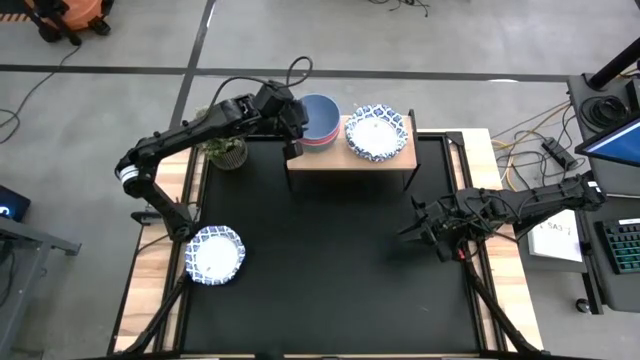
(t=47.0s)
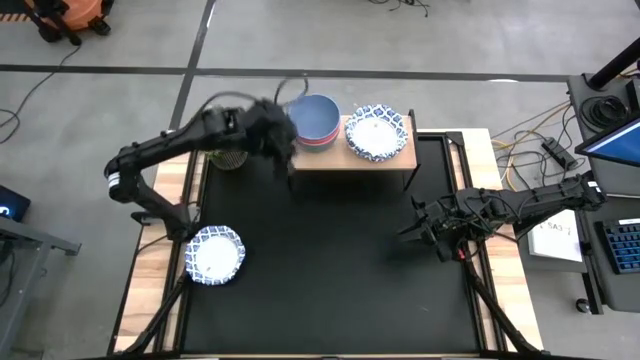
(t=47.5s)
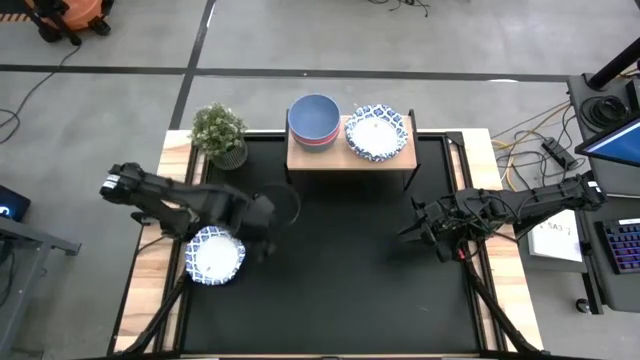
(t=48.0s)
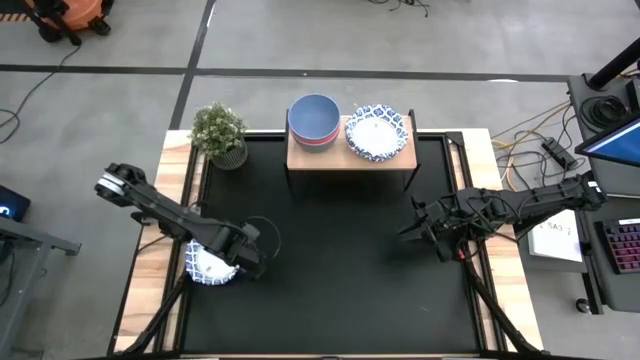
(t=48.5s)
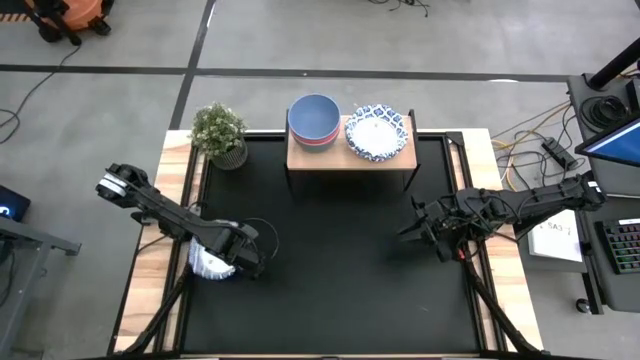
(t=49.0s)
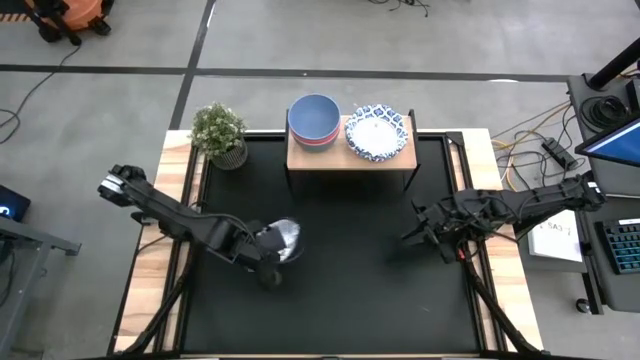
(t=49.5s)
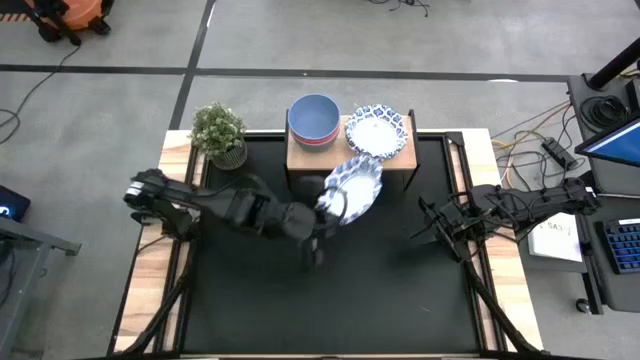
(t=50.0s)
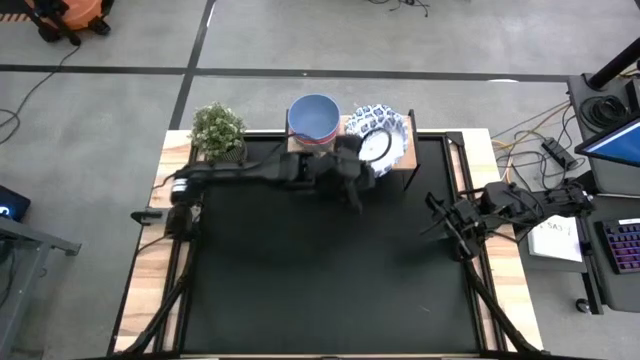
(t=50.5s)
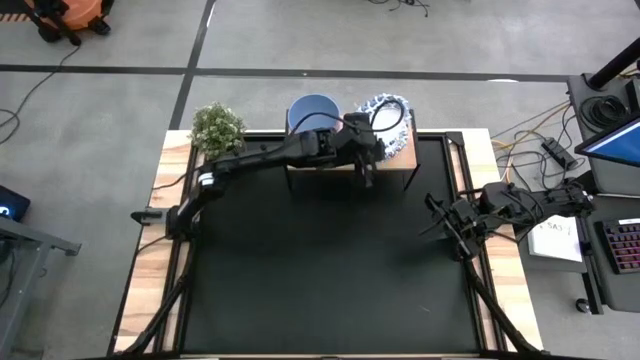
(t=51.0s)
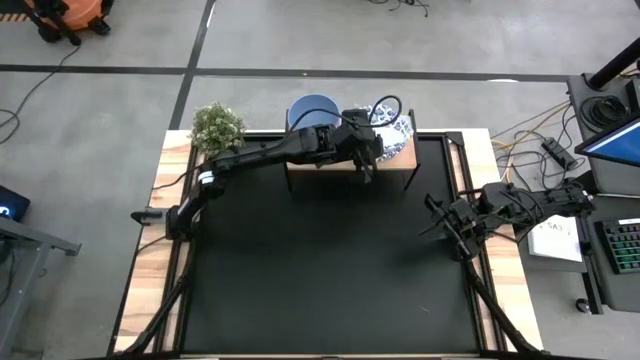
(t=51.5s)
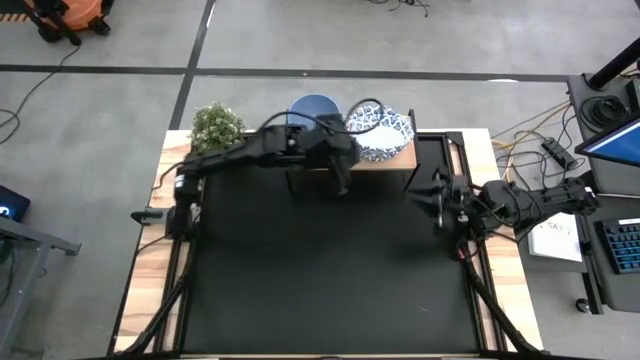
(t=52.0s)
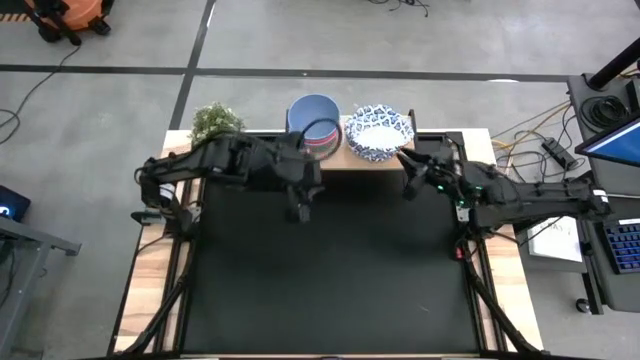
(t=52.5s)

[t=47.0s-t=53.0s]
Task: Place and stack bowls onto a shelf
Stack the white and blue paper plate on the white and blue paper plate on the shelf

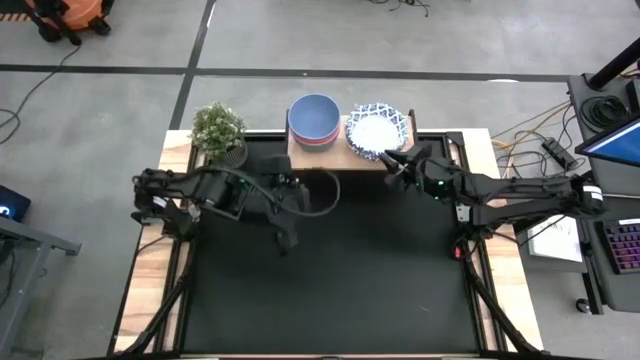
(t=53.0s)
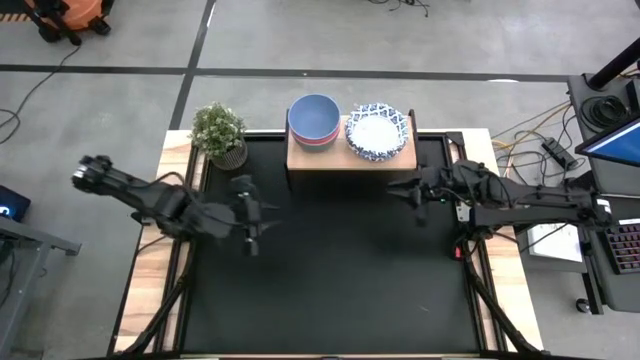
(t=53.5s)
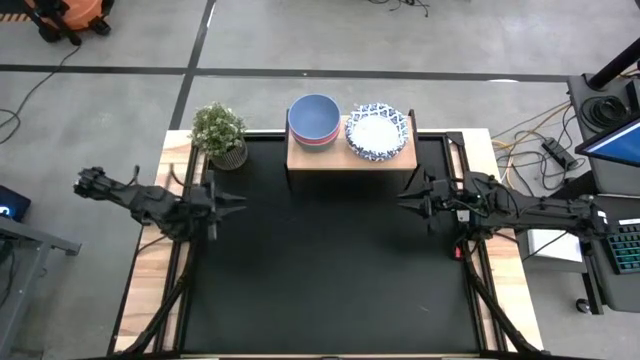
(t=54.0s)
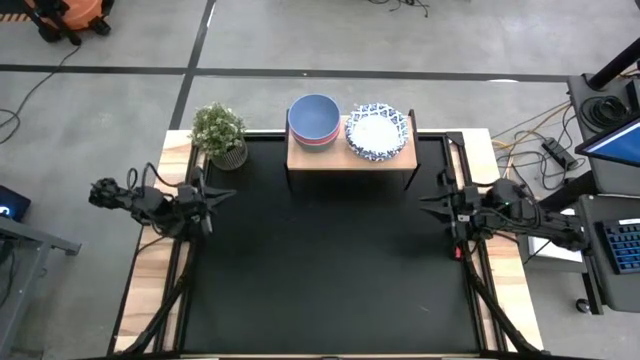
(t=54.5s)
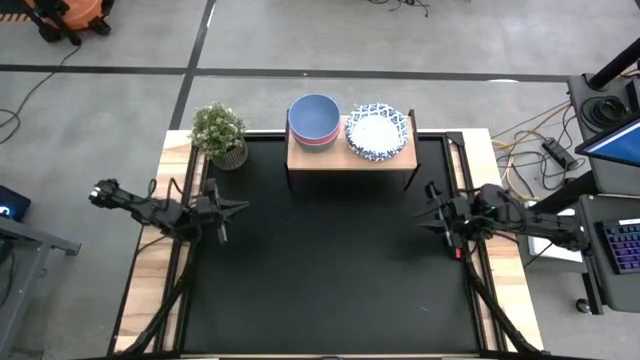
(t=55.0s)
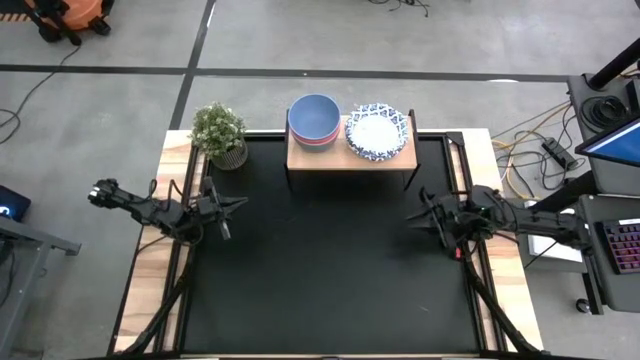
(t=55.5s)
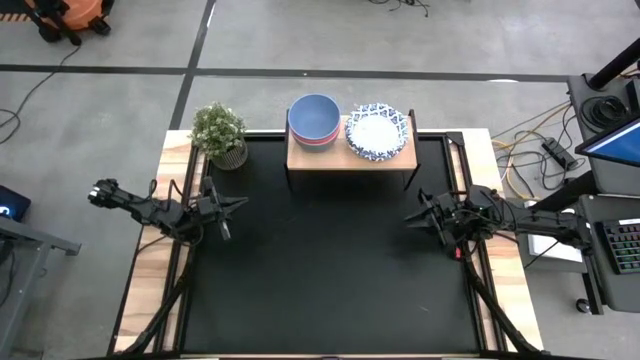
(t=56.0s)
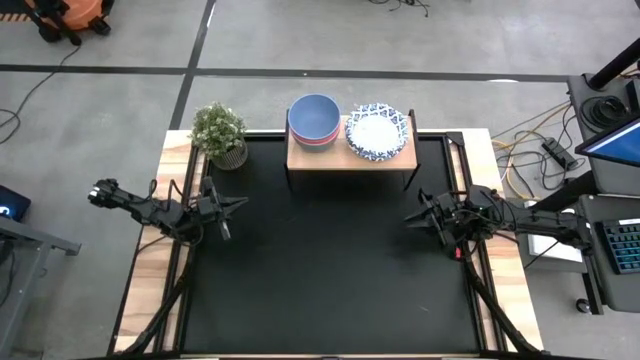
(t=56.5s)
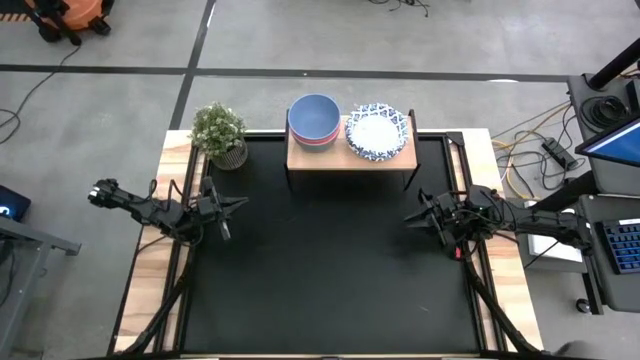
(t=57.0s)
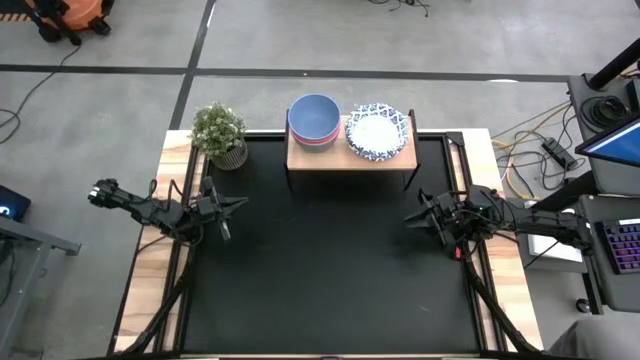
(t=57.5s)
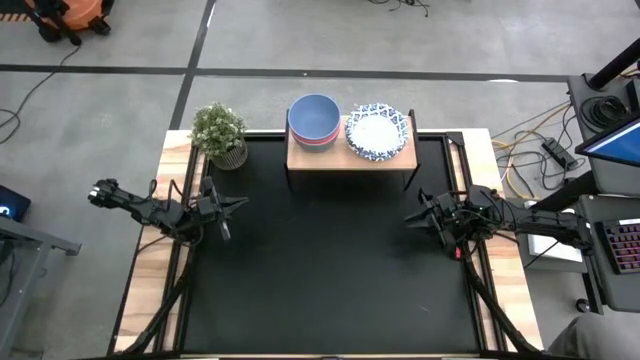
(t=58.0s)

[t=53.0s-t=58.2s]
Return to Home Position

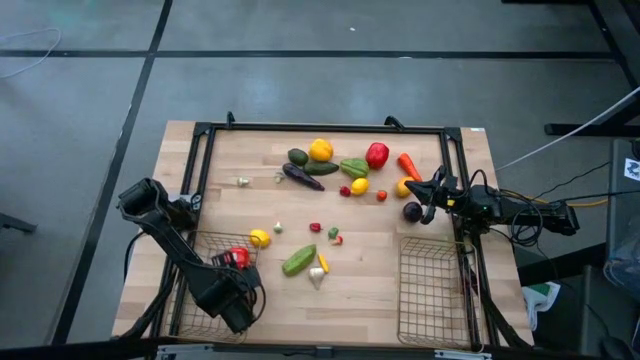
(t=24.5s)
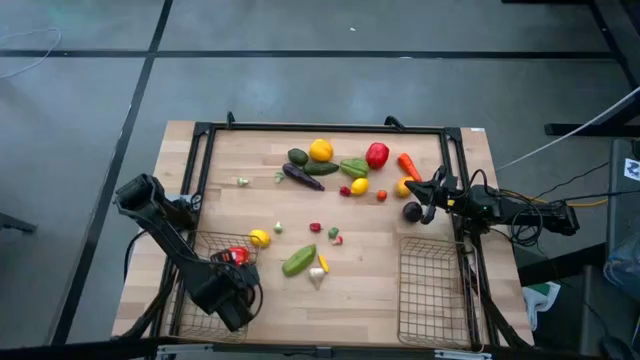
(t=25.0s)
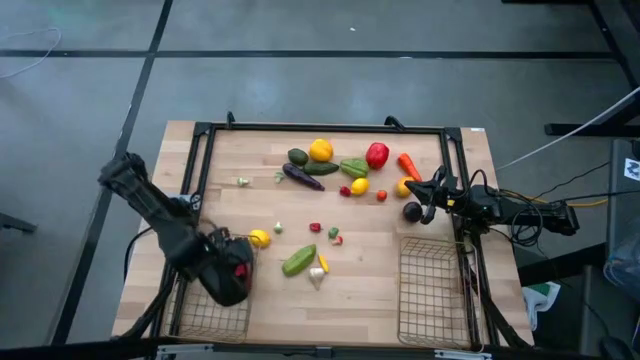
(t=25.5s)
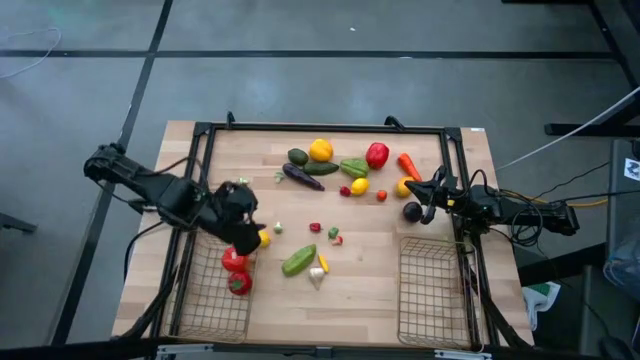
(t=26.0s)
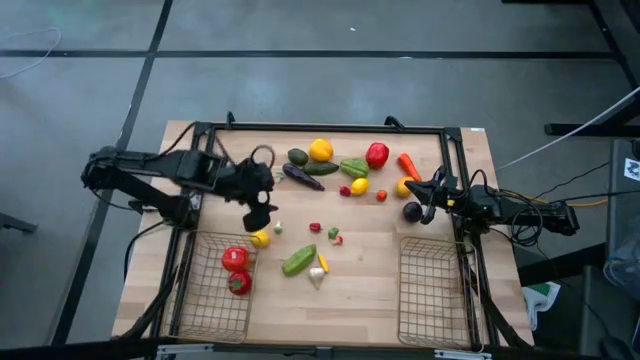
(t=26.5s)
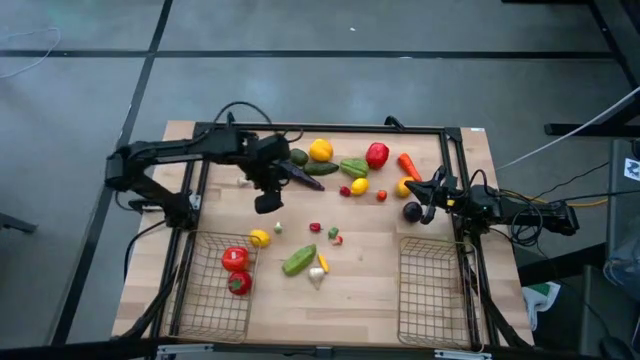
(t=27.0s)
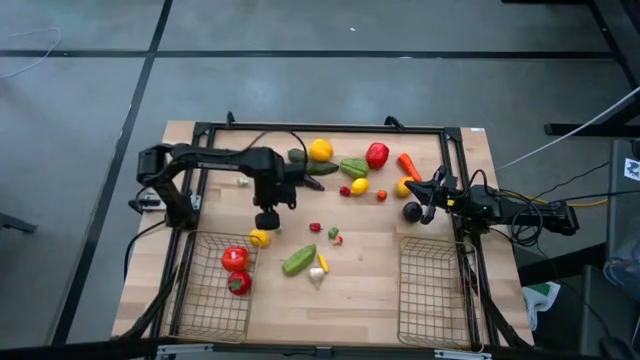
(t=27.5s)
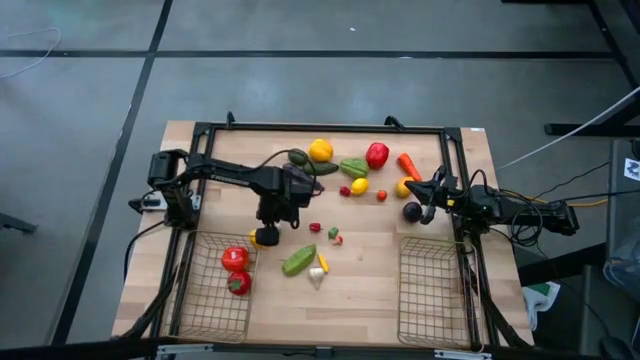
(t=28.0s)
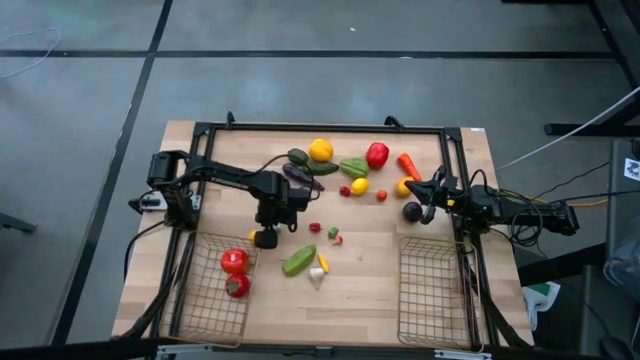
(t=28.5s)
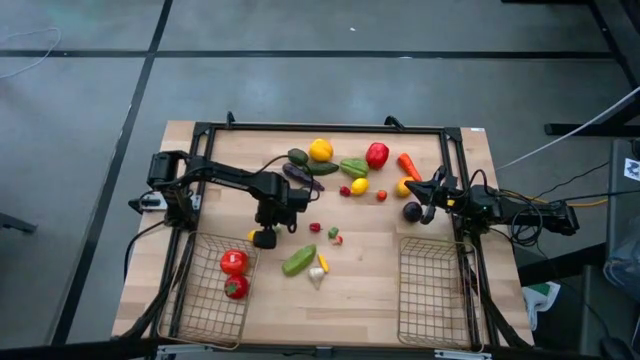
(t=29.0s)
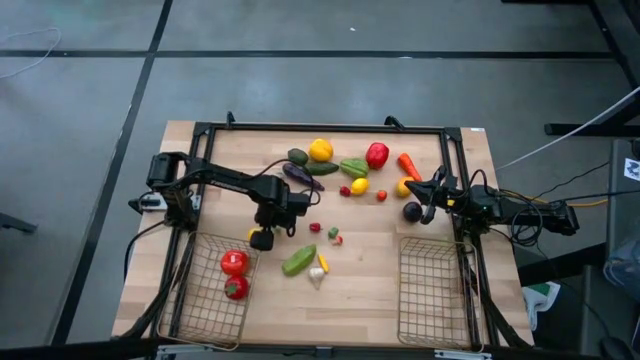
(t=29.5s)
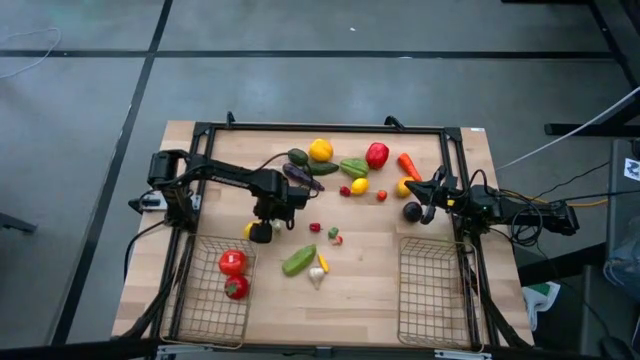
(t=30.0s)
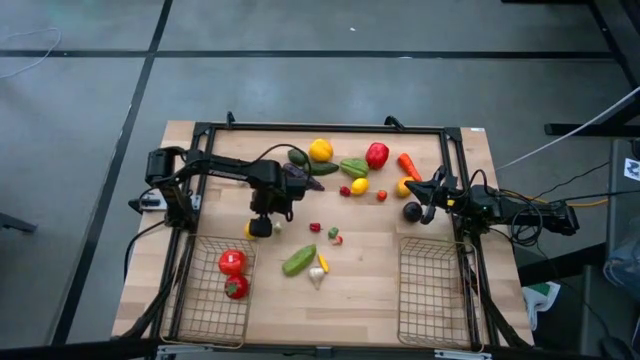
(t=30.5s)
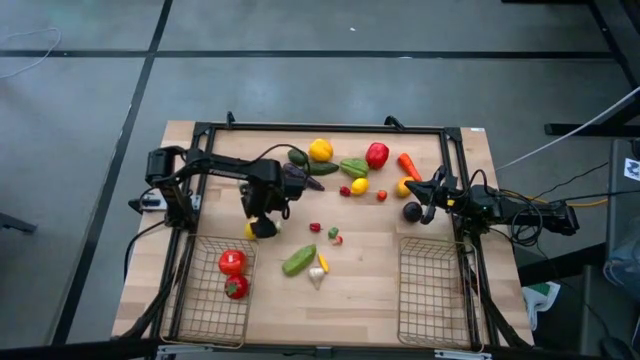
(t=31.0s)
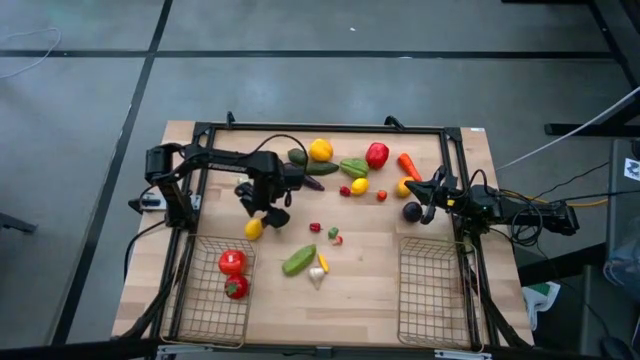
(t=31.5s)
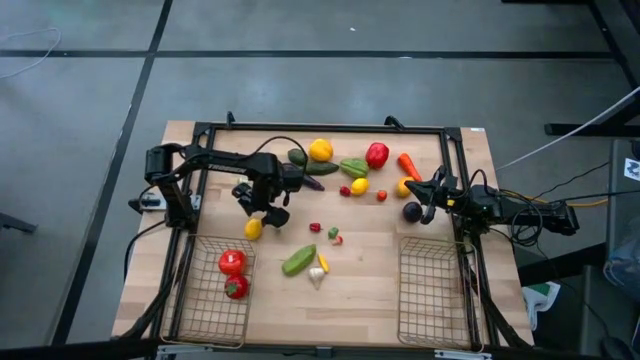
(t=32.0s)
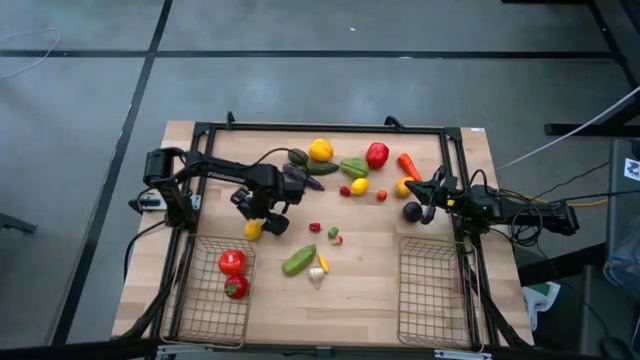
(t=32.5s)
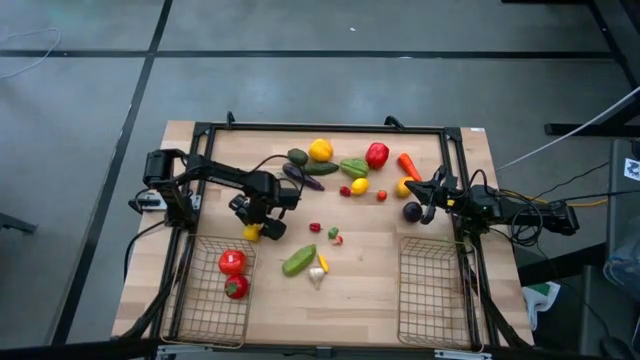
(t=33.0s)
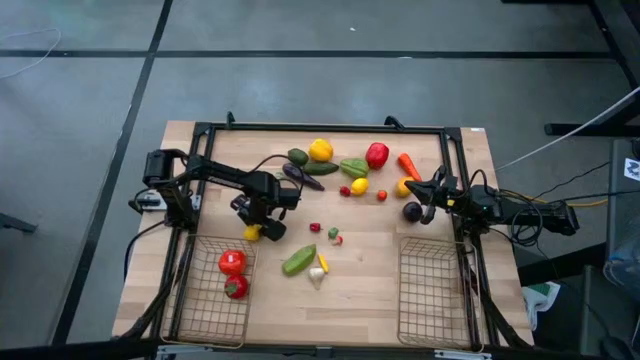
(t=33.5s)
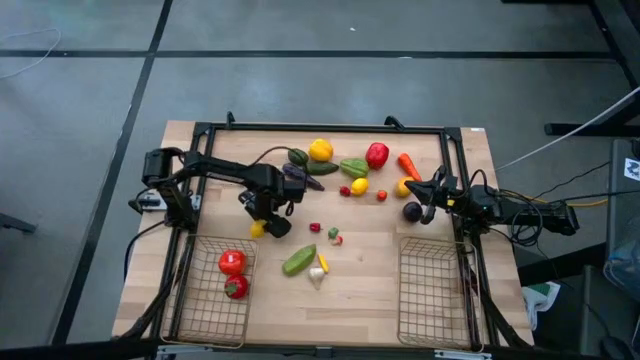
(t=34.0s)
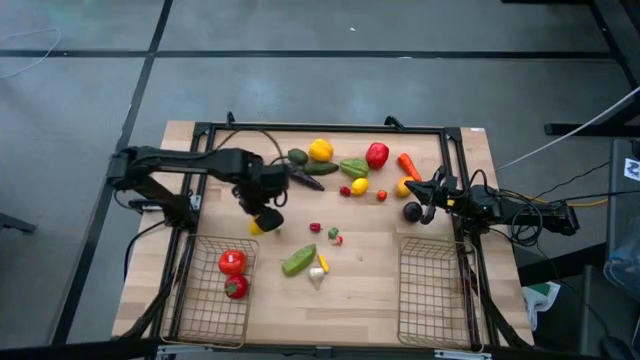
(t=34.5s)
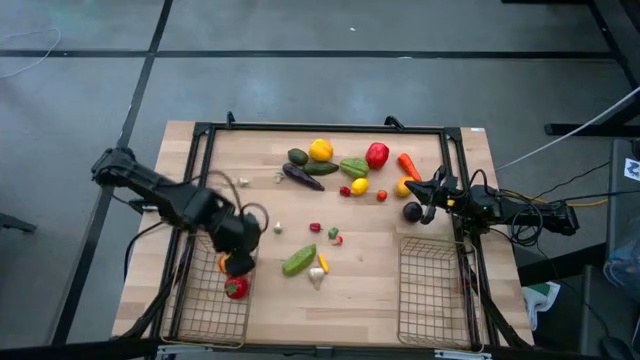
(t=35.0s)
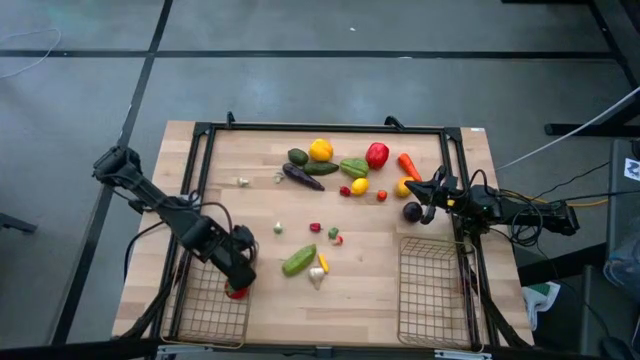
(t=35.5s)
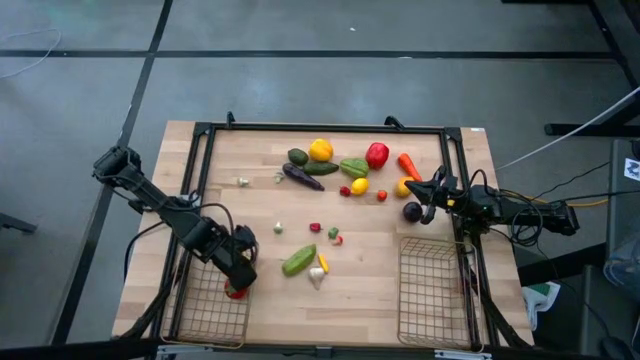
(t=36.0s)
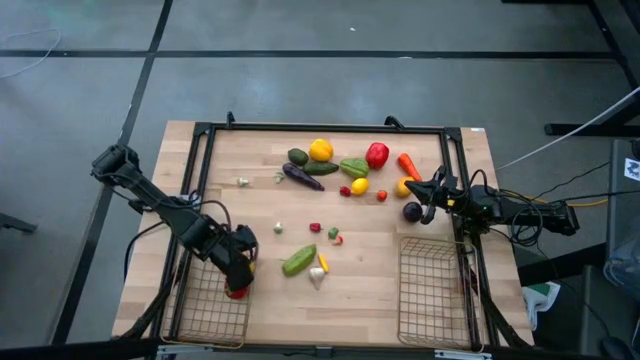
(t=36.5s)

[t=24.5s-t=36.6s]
Task: Sort produce into baskets
Put the bottom yellow lemon into the left wire basket
